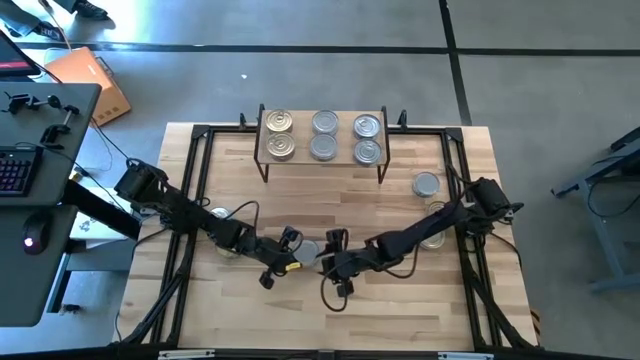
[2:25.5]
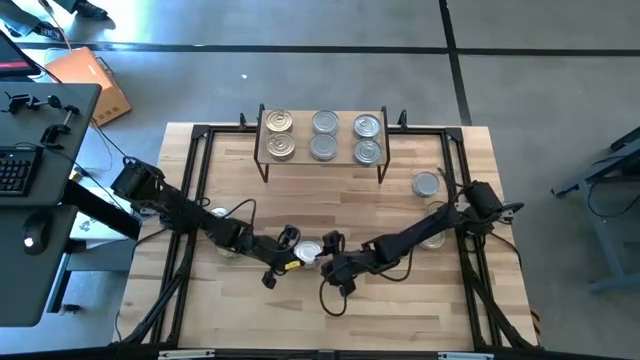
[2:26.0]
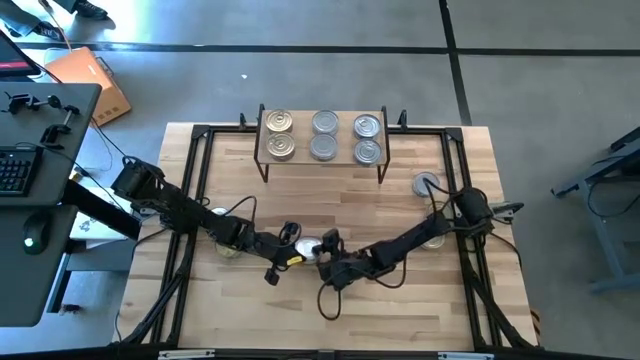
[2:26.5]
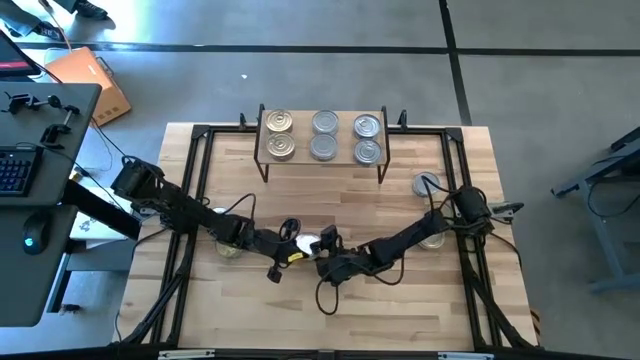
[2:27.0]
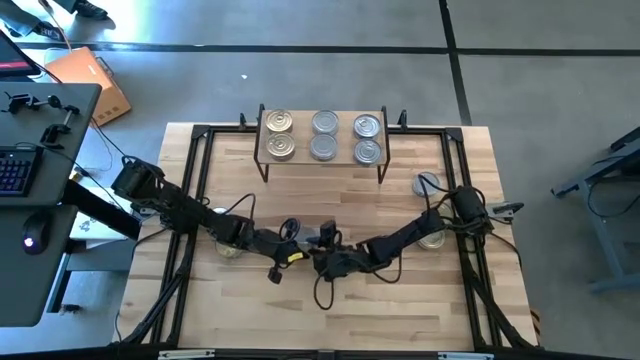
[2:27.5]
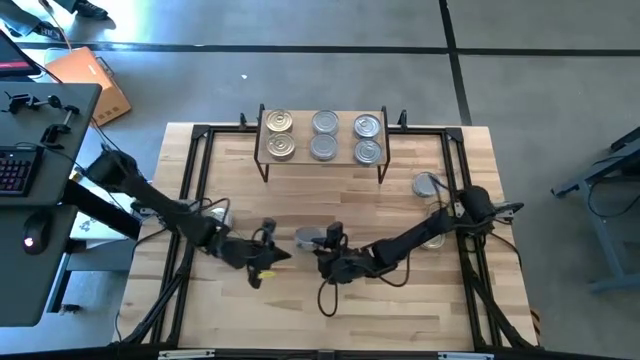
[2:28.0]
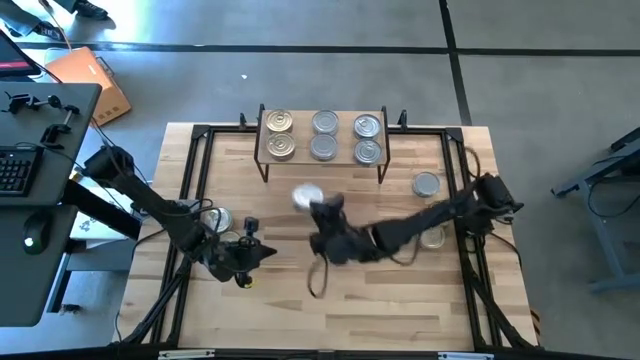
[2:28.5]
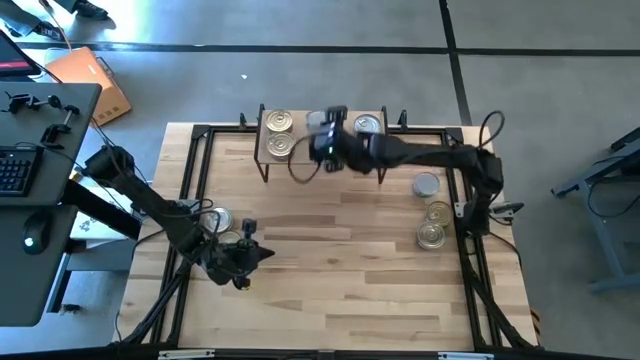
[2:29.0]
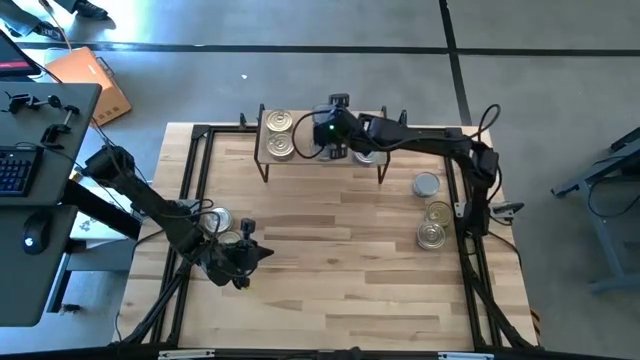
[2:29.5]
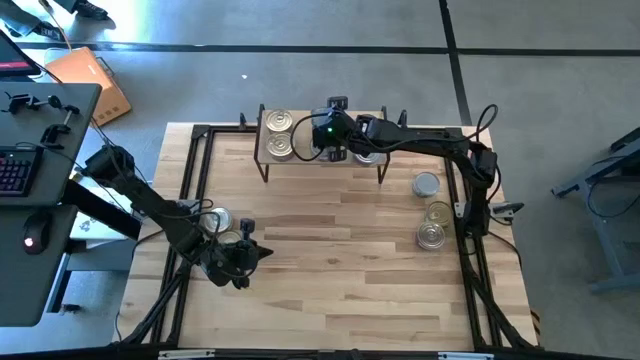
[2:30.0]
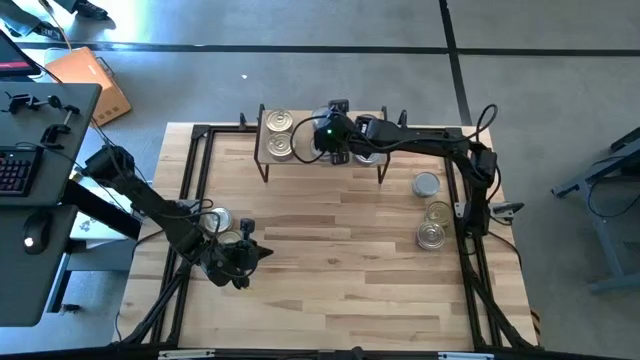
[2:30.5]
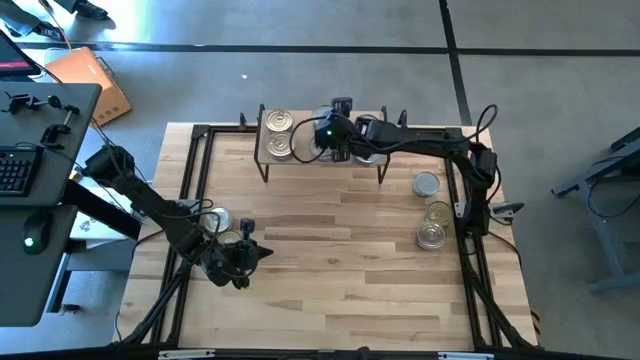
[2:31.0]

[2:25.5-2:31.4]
Task: Stack canned seafood by type on shelf
Stack the left green and white tuna can on top of the green and white tuna can on the shelf

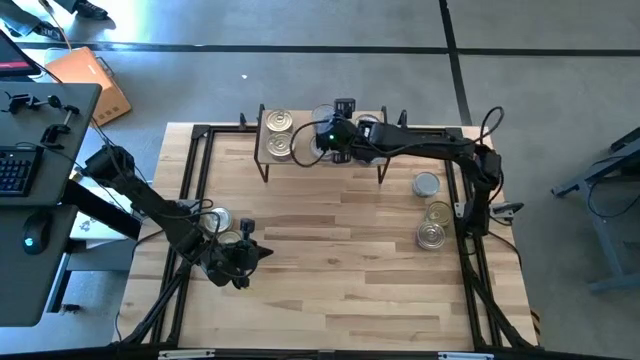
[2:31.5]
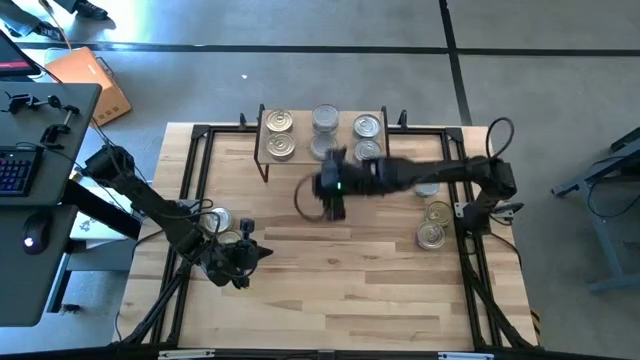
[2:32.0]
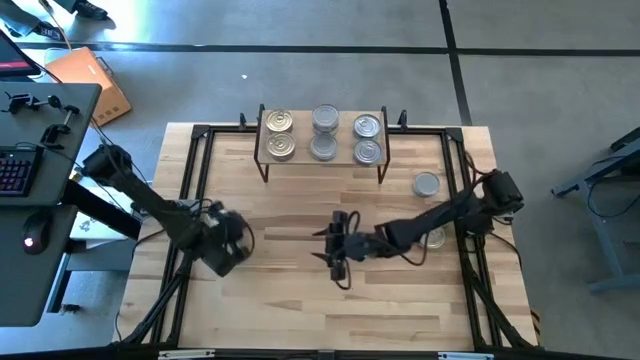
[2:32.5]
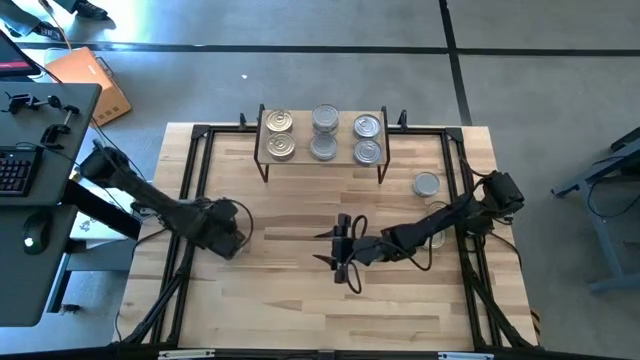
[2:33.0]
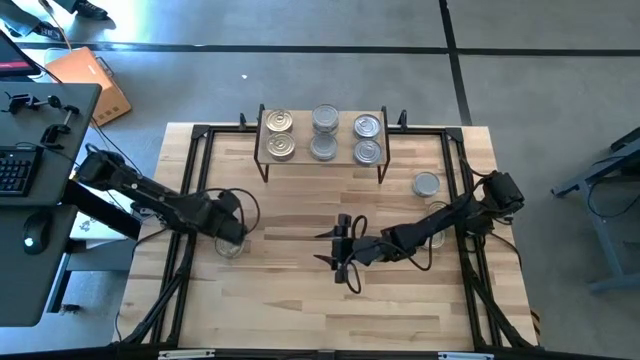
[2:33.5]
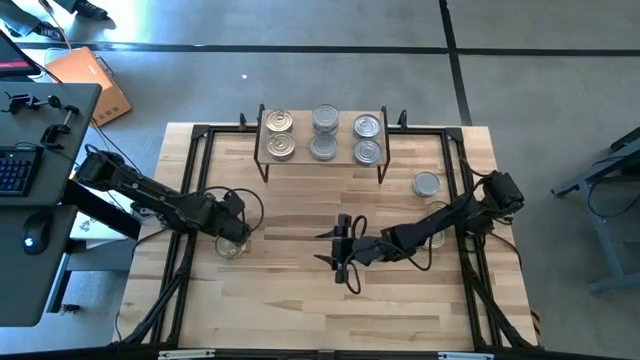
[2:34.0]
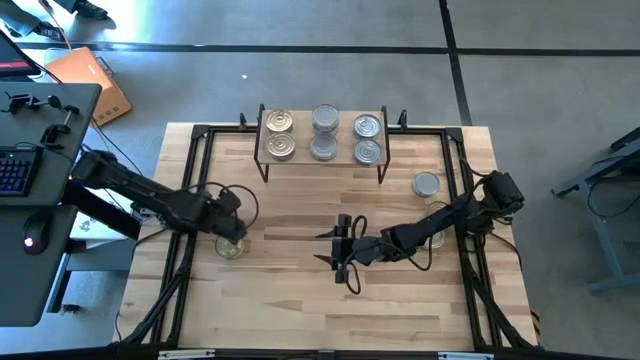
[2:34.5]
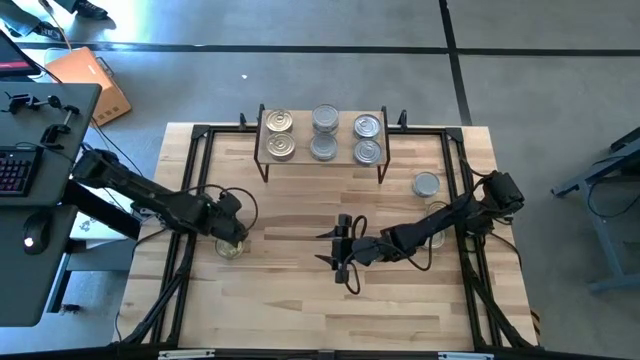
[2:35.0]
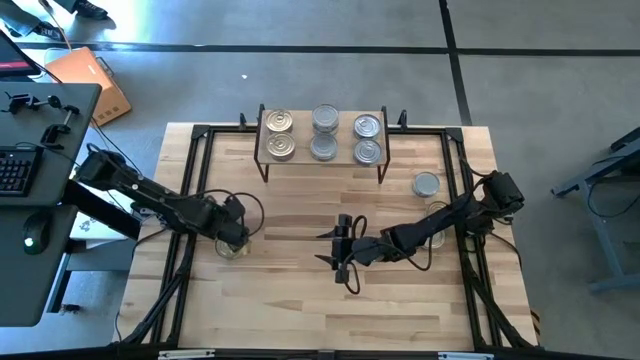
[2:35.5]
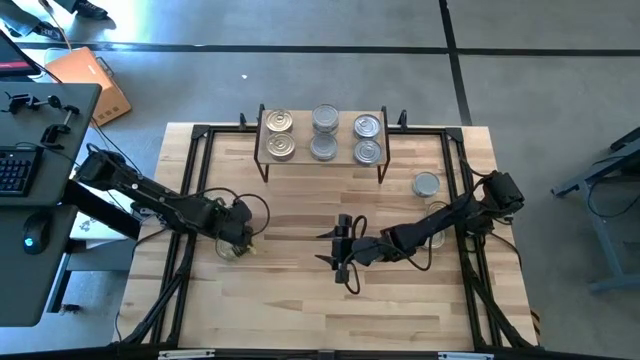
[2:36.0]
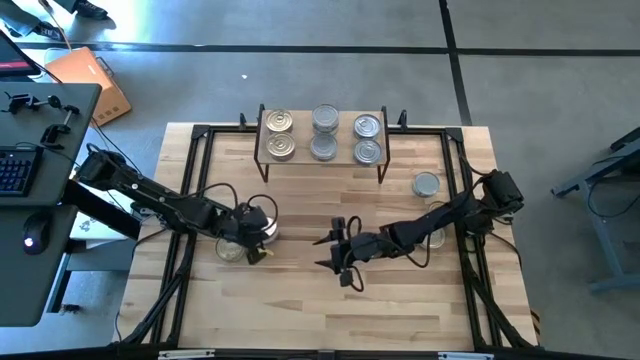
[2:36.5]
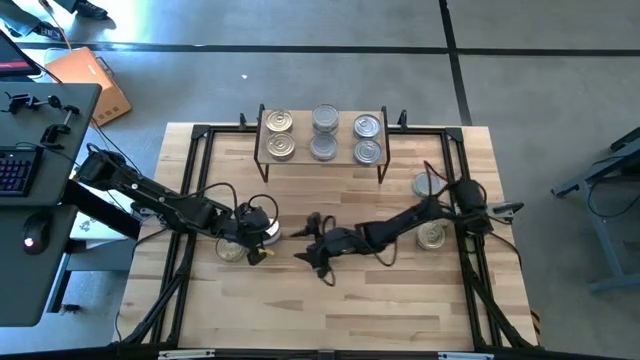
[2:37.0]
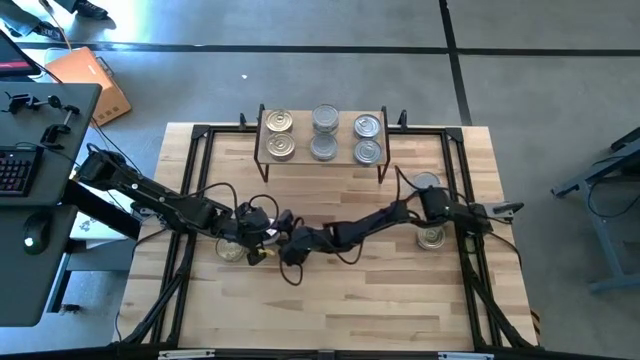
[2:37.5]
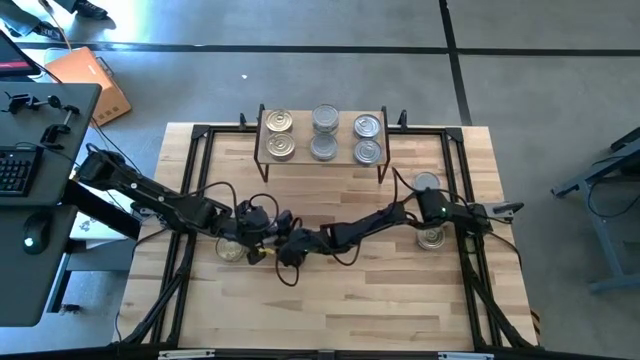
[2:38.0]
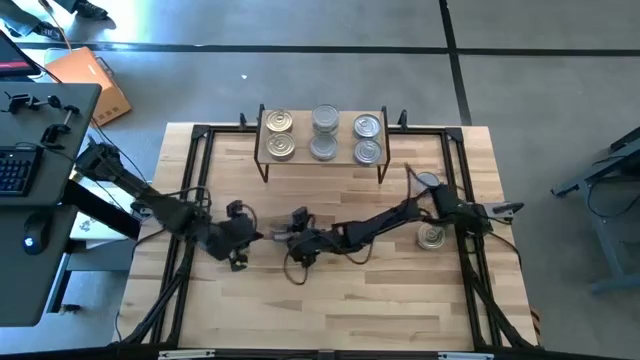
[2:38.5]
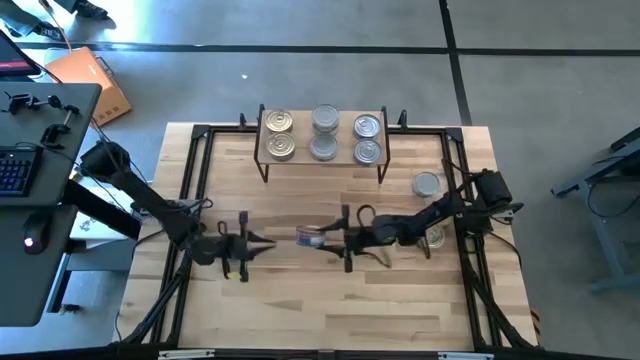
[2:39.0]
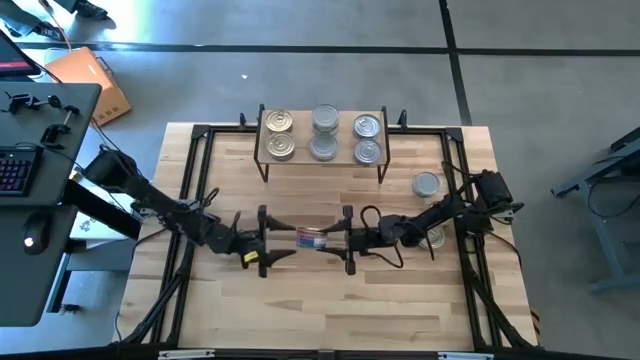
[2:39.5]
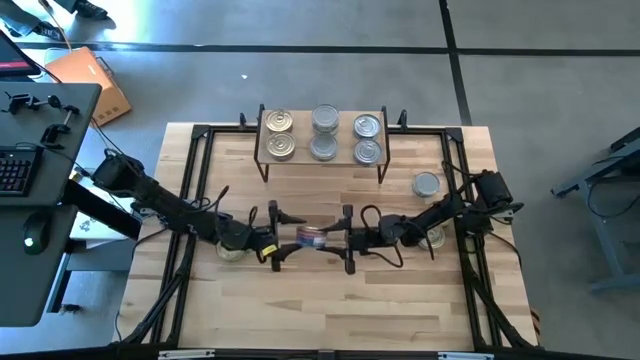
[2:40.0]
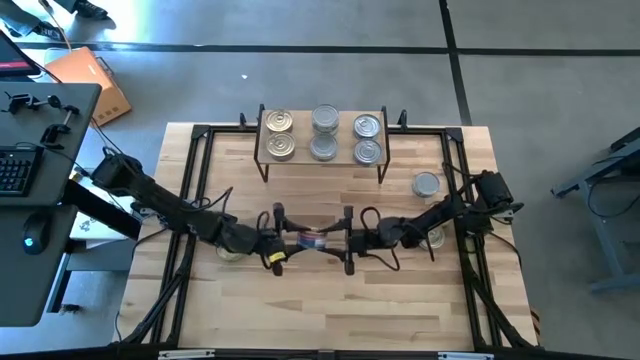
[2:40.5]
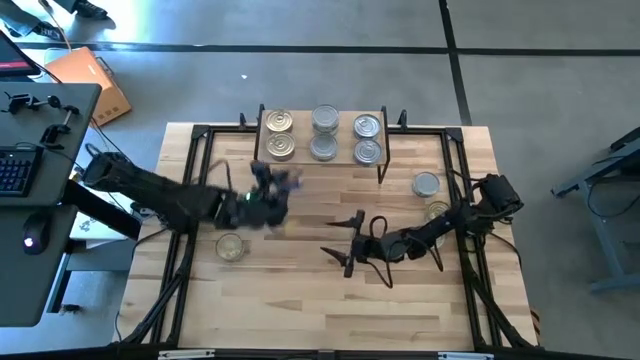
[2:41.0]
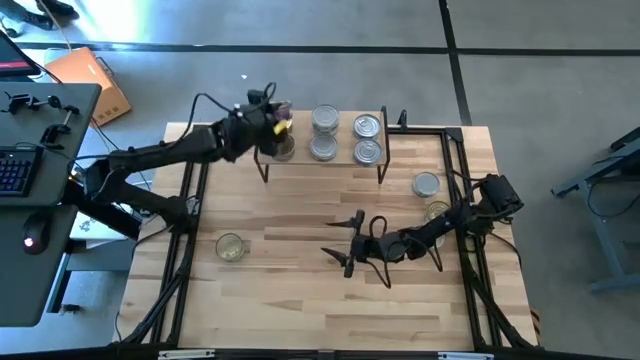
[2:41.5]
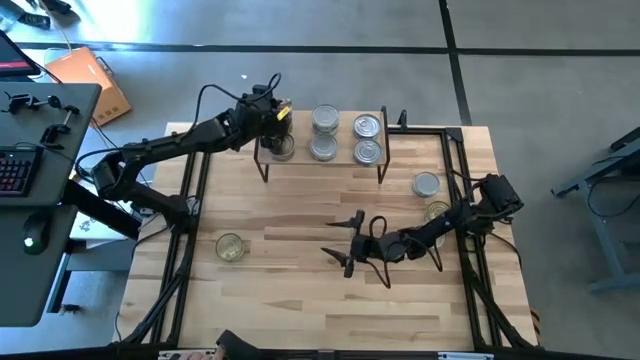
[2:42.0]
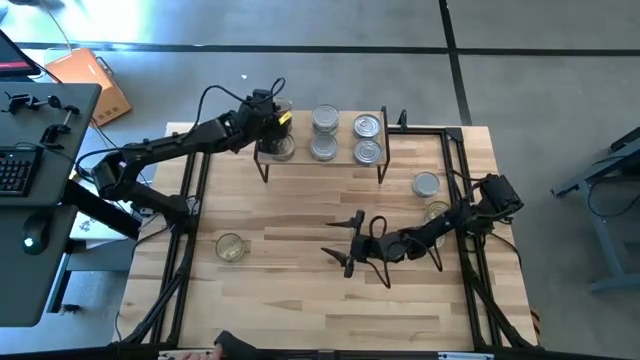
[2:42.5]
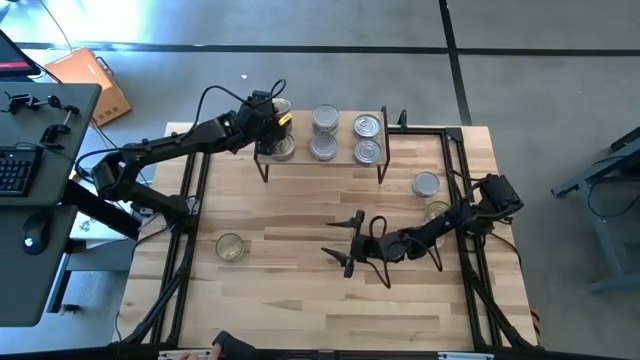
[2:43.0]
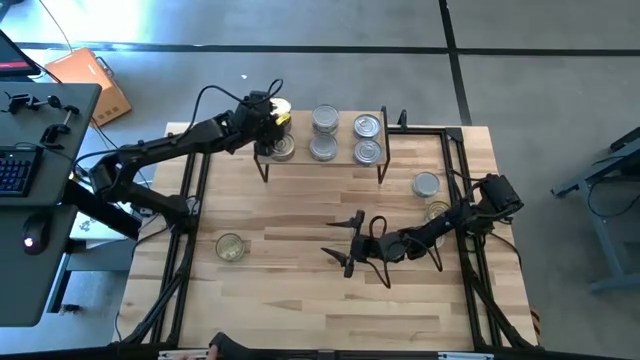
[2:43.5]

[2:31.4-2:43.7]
Stack the left blue and pink tuna can on top of the blue and pink tuna can on the shelf

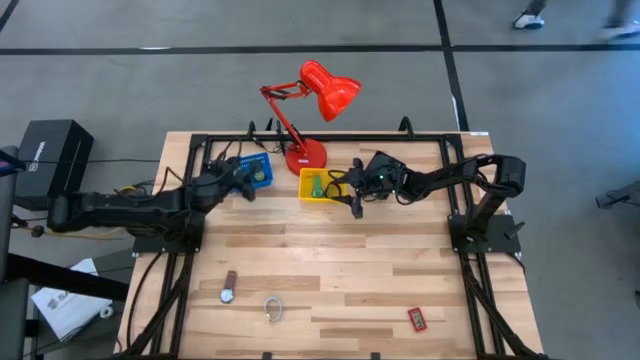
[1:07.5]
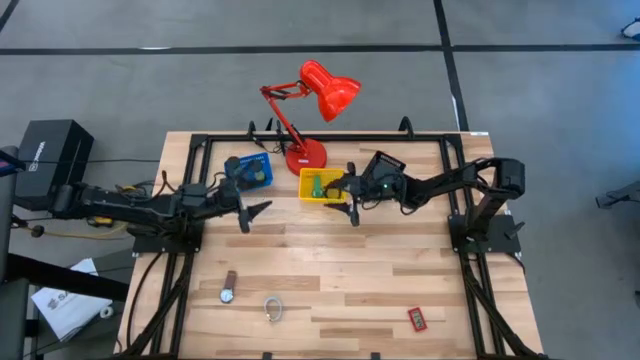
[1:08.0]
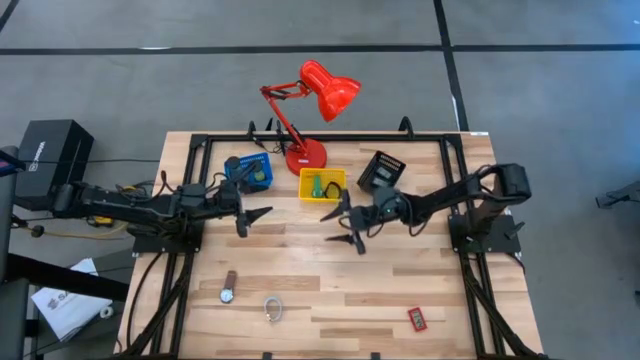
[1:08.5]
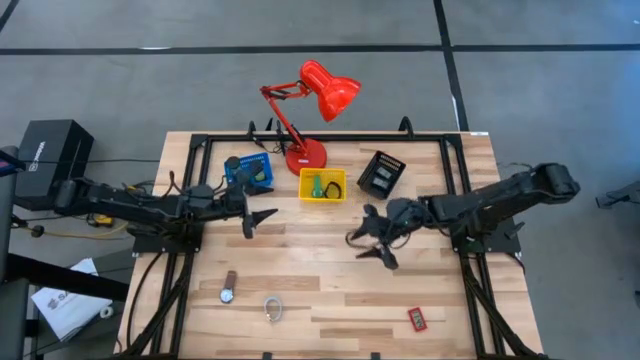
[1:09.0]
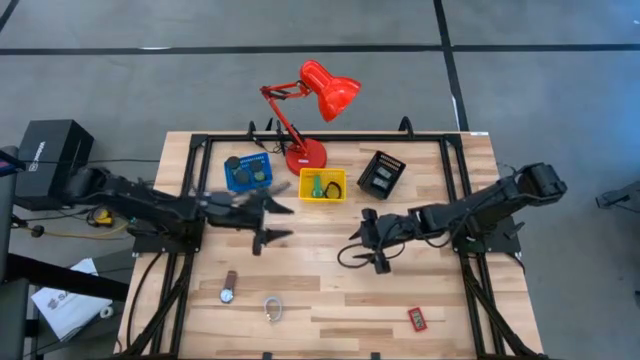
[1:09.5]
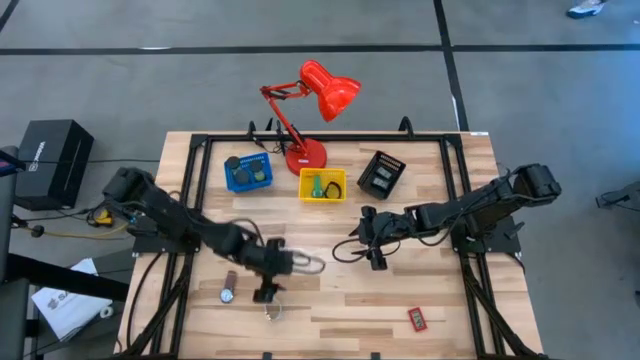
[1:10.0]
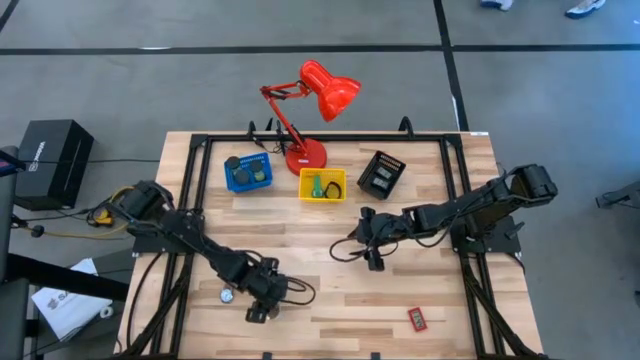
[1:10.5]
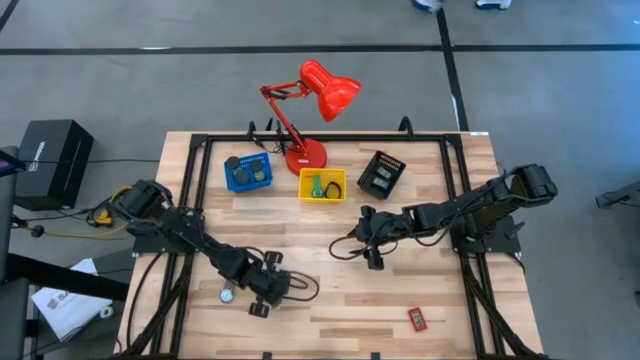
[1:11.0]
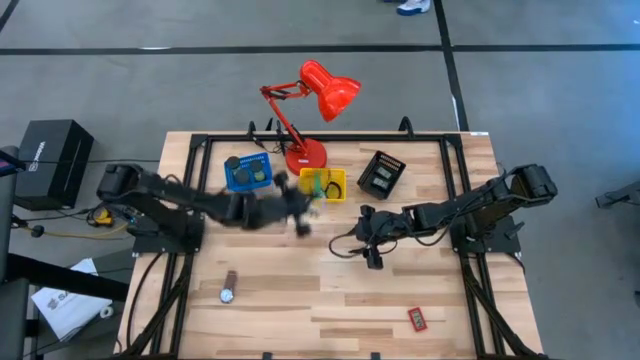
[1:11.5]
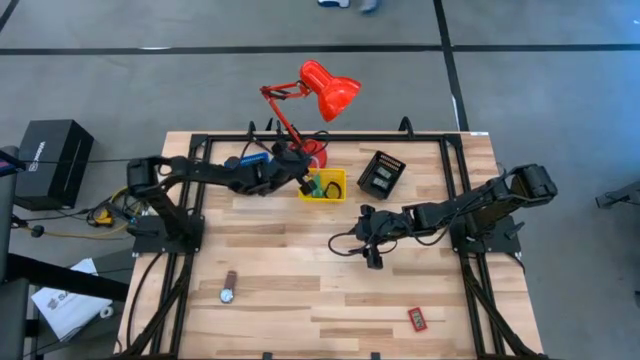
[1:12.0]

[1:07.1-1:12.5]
Task: Pick & Place Office items
Put the white wrist watch into the yellow bin
